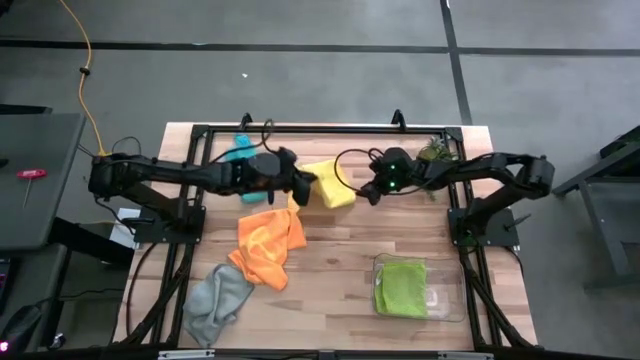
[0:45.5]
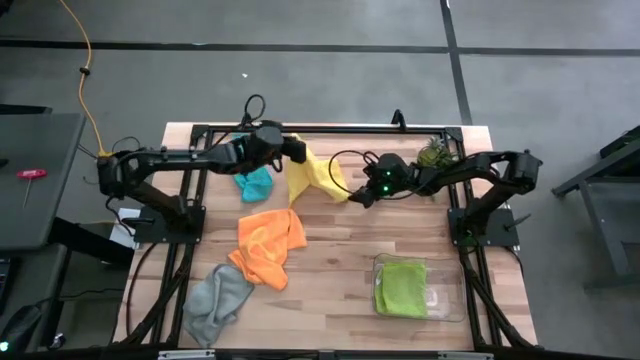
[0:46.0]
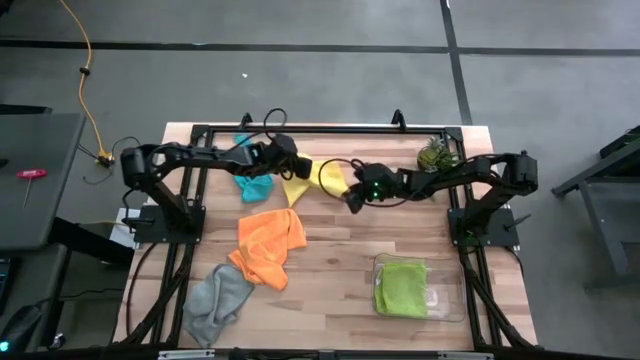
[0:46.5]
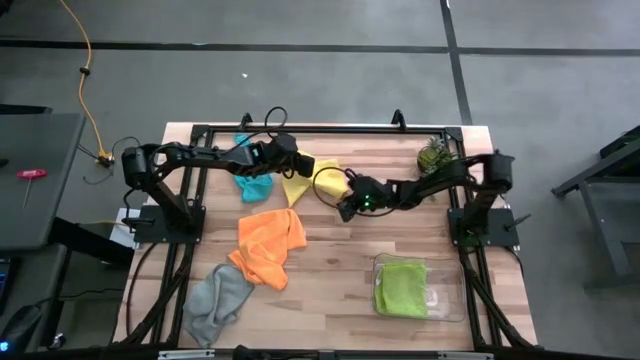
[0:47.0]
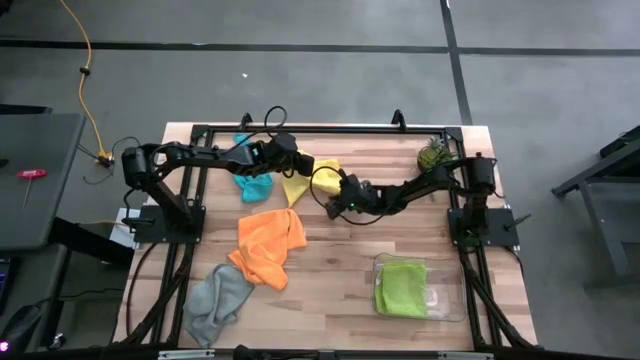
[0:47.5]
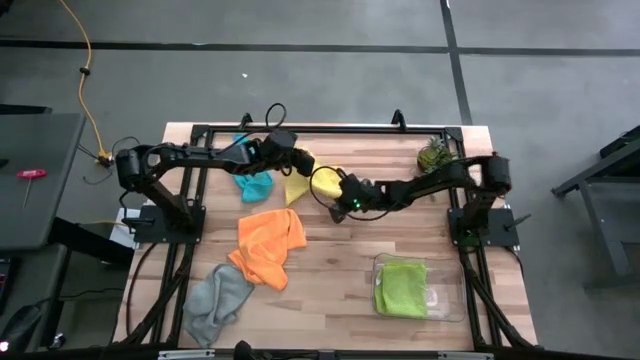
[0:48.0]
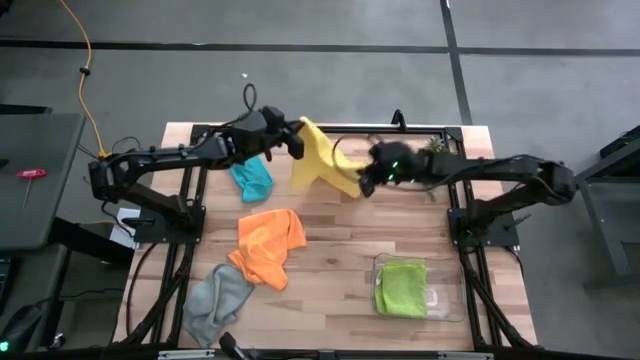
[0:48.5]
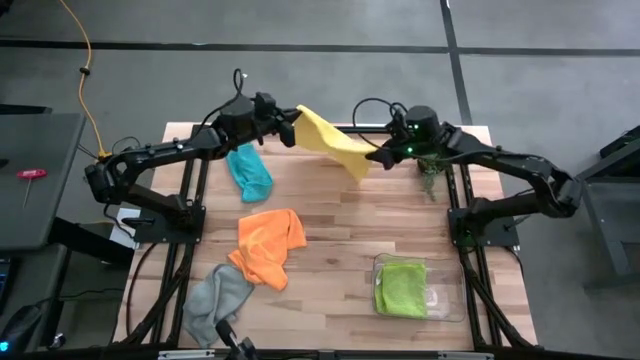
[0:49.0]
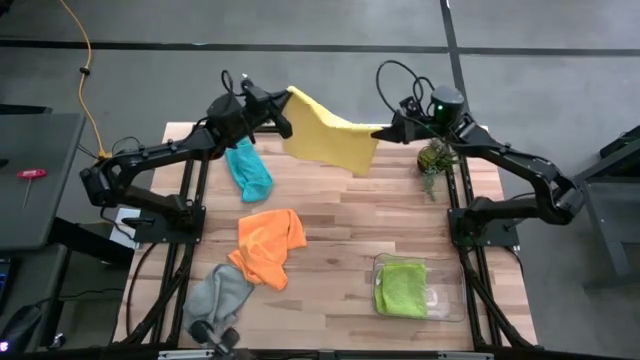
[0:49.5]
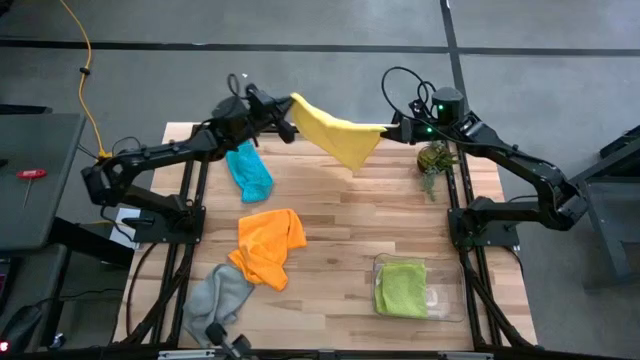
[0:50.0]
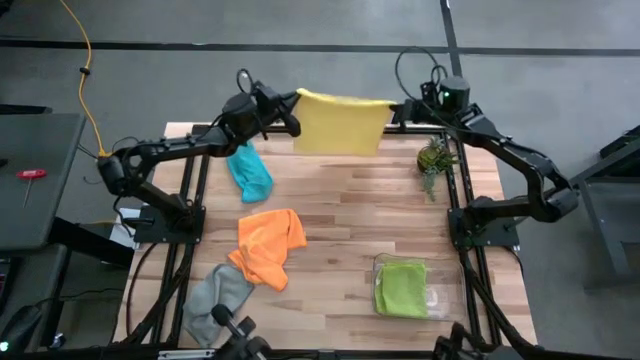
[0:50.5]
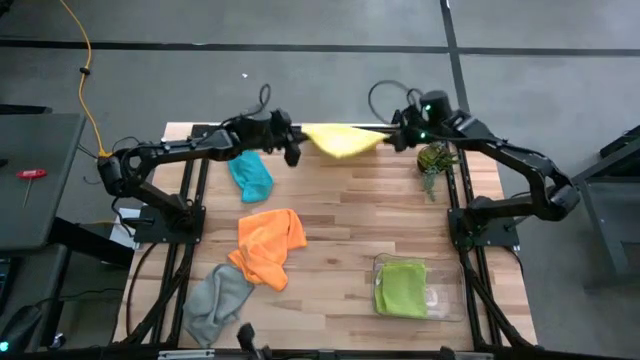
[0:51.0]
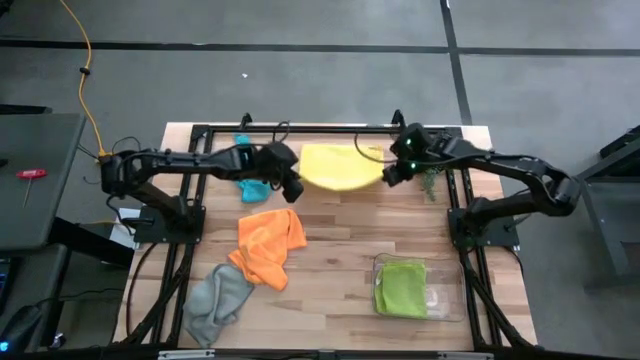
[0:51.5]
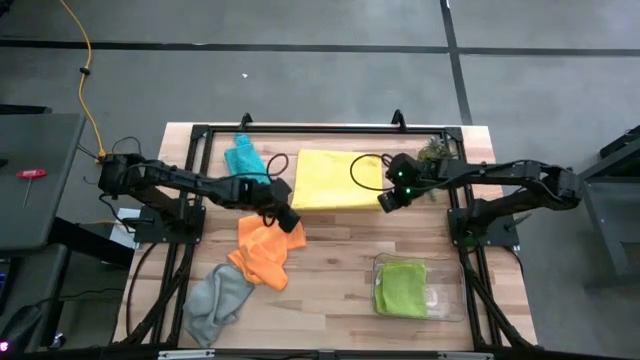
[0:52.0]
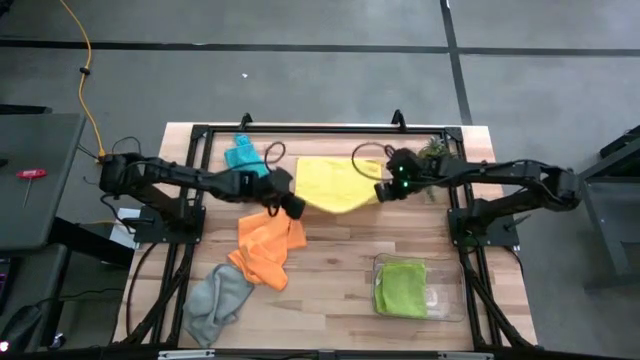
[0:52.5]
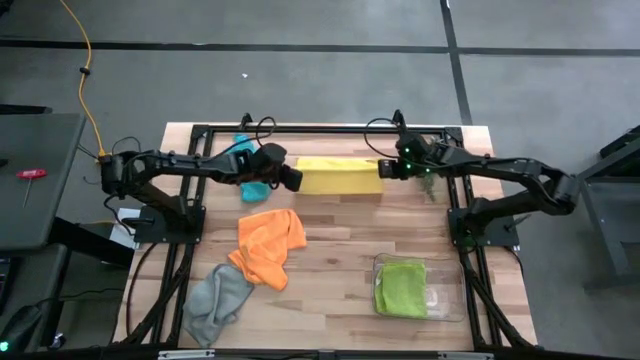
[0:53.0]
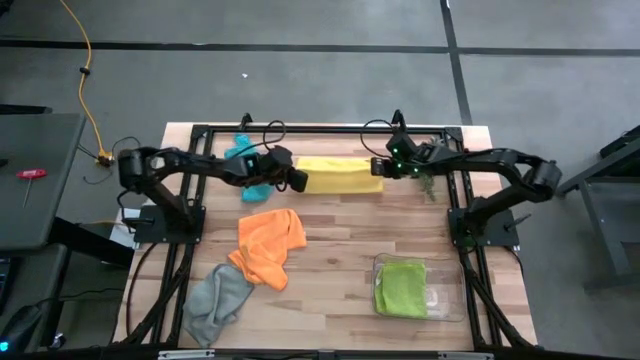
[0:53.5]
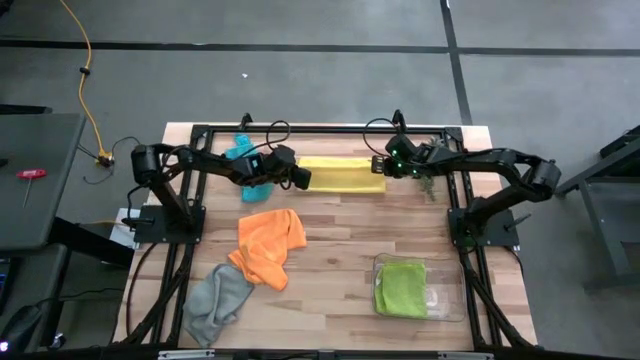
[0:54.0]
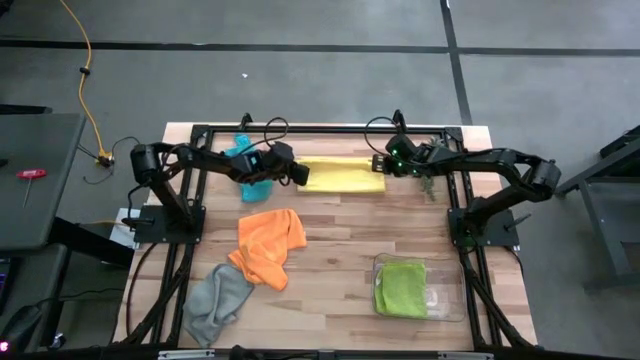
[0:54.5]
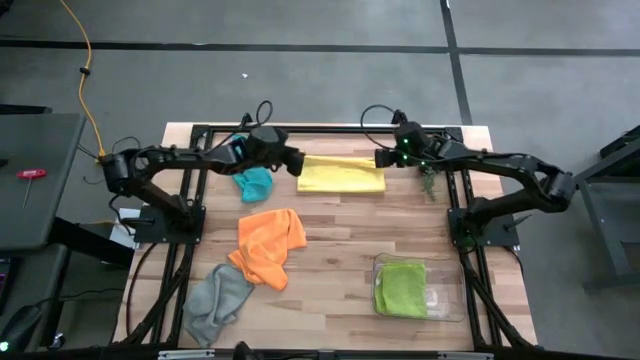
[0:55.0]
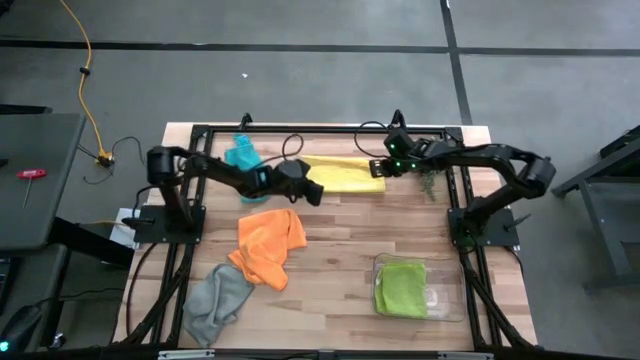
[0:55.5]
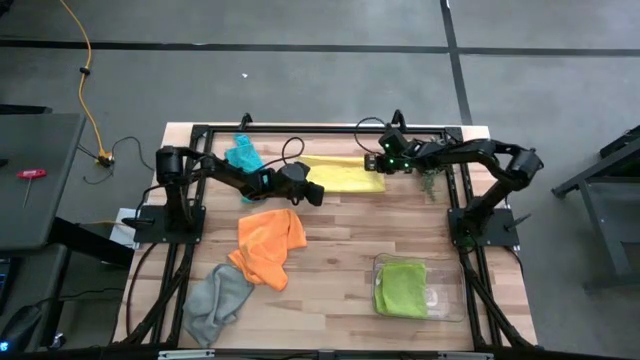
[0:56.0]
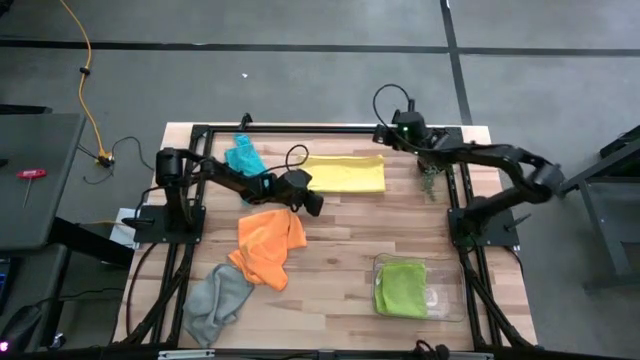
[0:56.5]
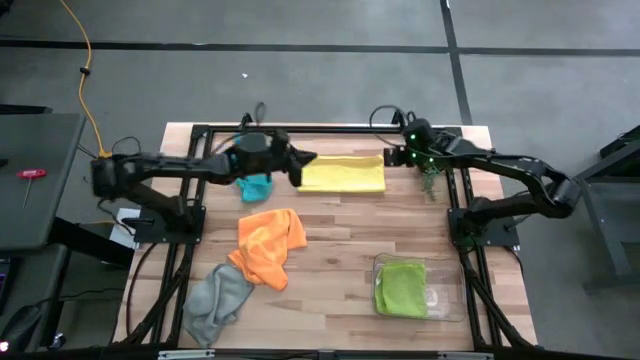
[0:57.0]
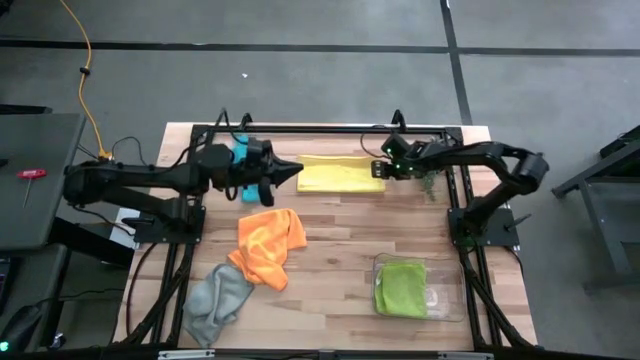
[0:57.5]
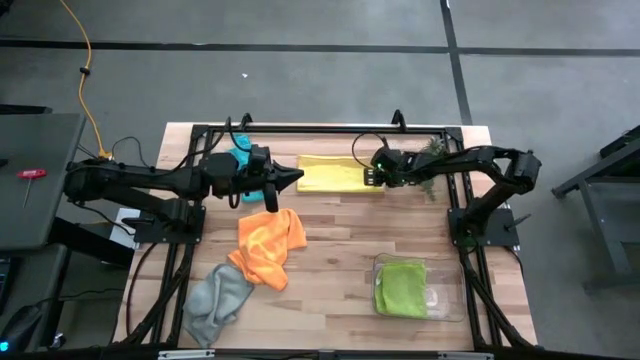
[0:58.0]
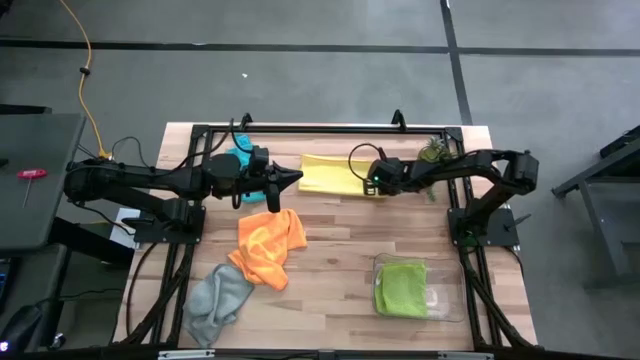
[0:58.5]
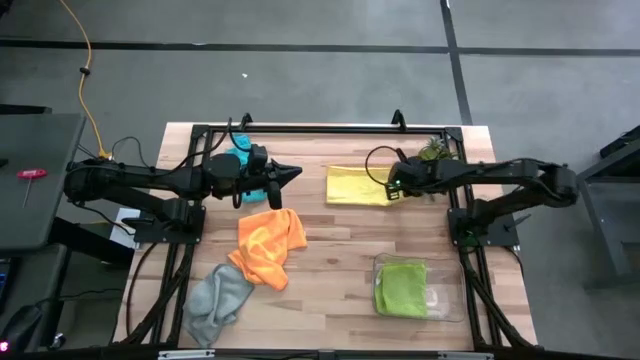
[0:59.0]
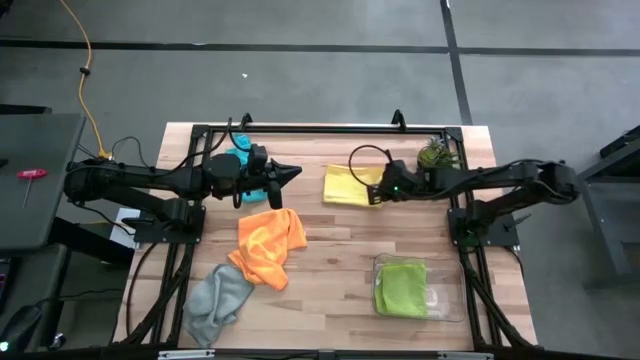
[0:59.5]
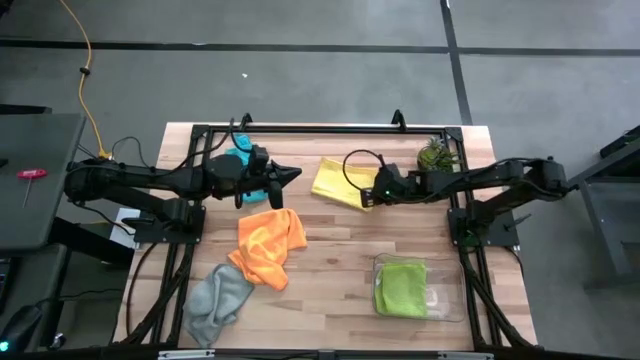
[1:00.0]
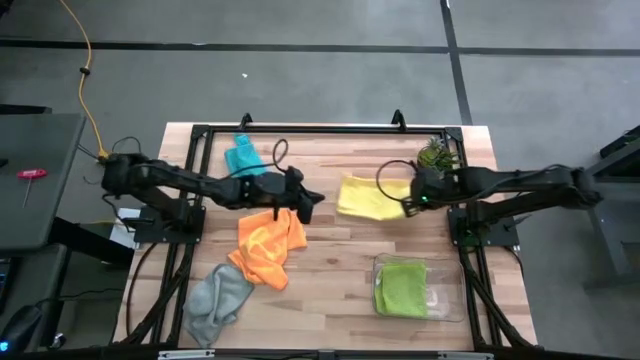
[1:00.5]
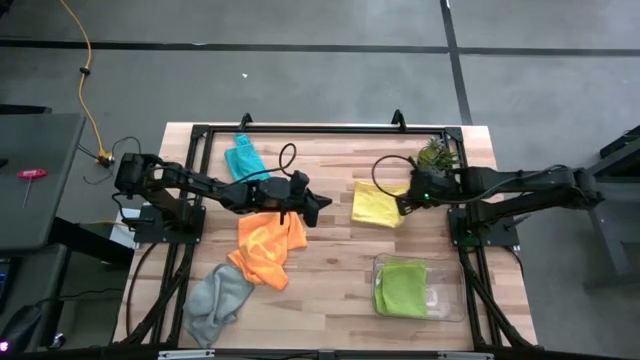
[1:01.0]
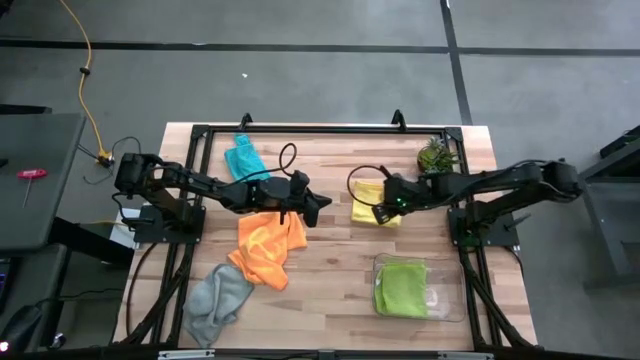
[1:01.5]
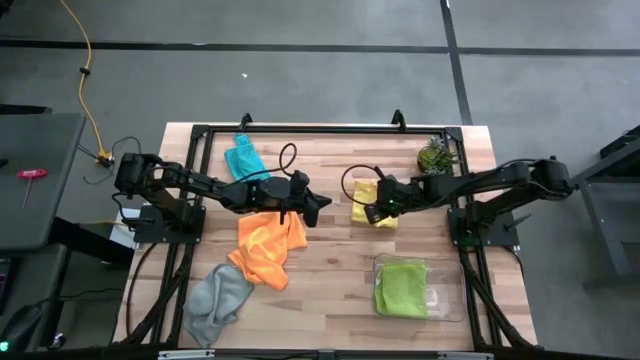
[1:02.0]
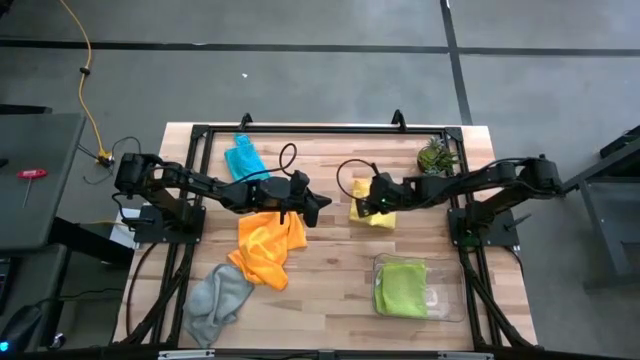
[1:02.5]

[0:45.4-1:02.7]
Task: Fold microfiber towels
Fold the yellow microfiber cloth

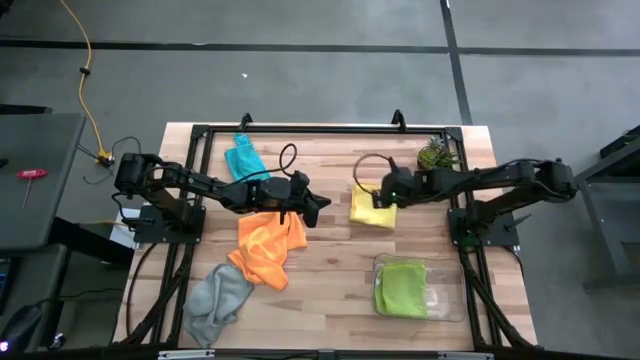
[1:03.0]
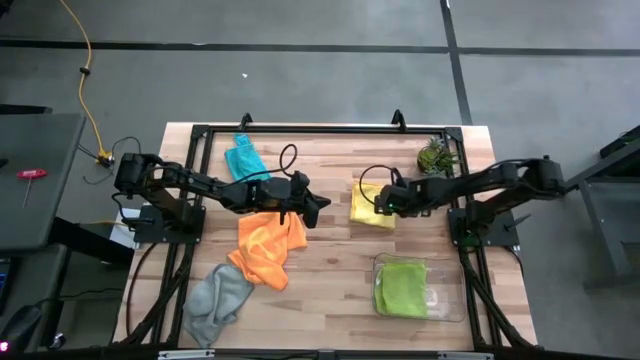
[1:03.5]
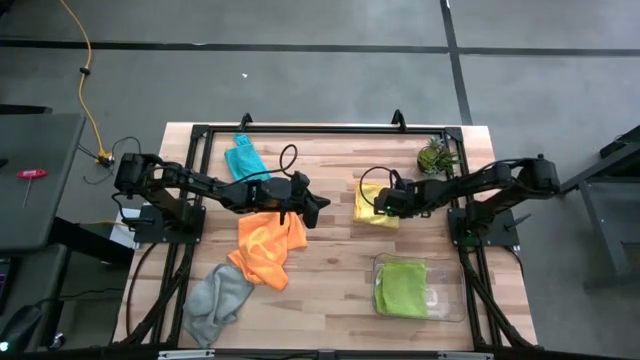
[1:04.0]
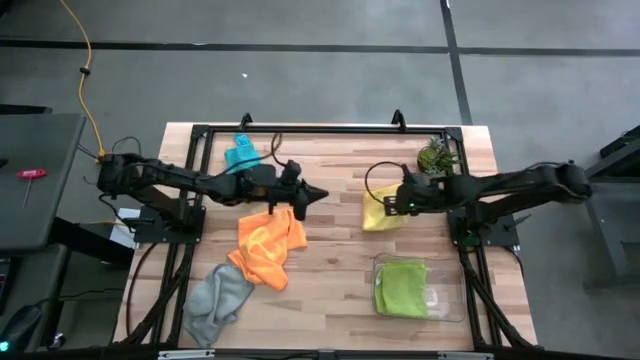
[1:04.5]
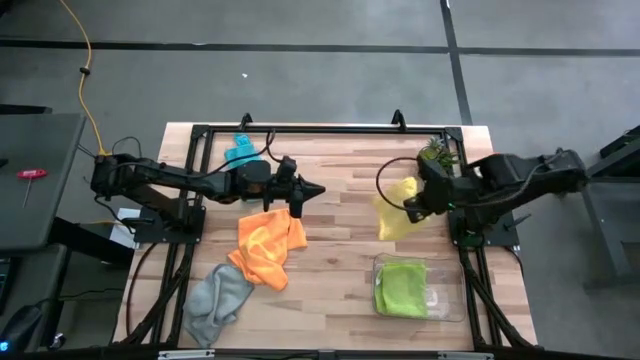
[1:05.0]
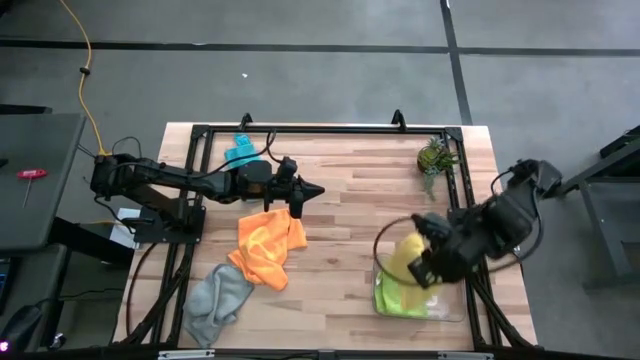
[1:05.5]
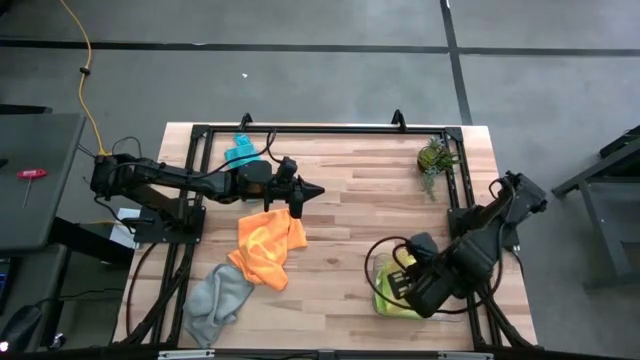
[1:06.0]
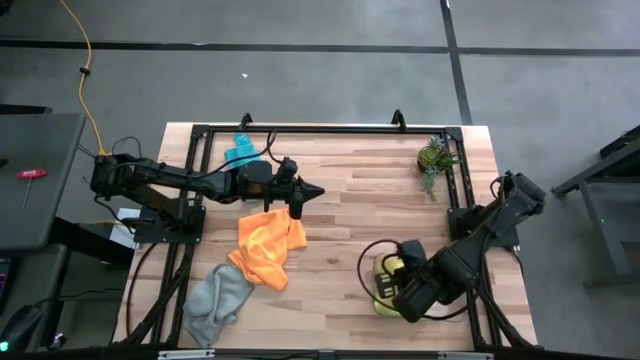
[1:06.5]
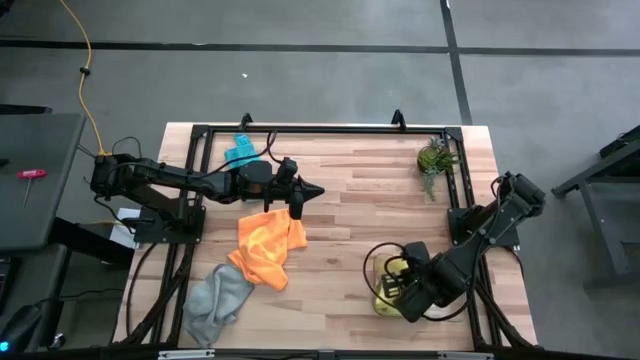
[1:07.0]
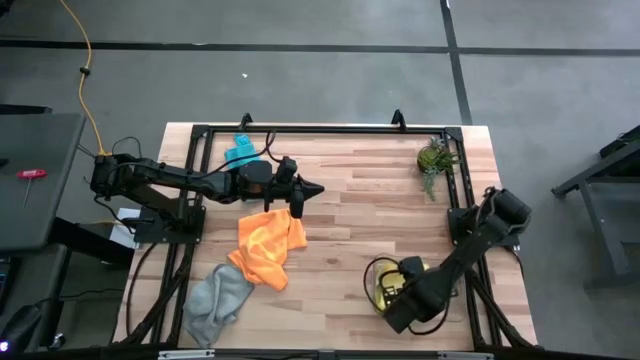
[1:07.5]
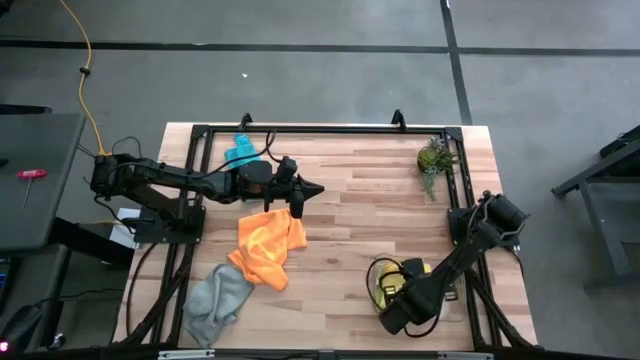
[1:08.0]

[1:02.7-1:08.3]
Put the yellow microfiber cloth into the transparent bin
